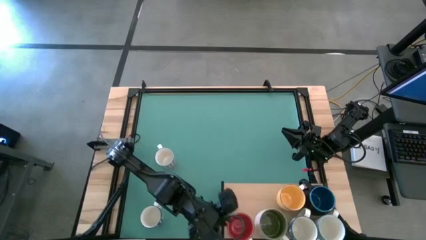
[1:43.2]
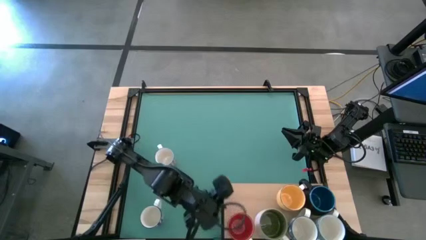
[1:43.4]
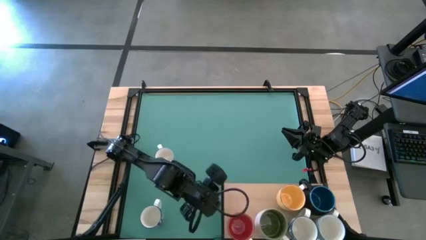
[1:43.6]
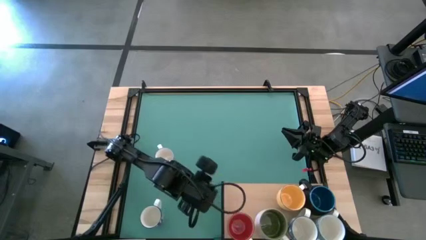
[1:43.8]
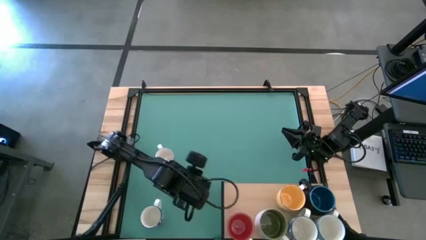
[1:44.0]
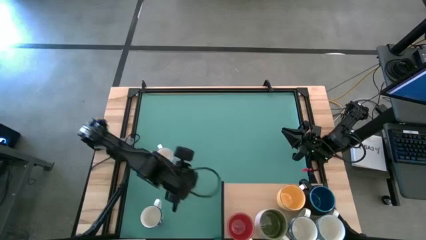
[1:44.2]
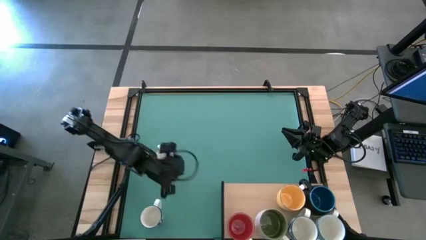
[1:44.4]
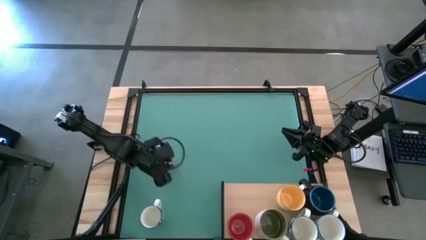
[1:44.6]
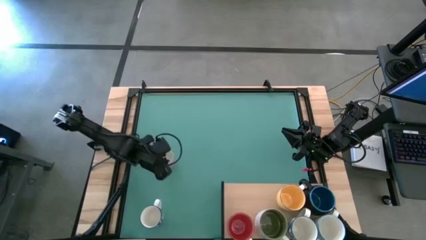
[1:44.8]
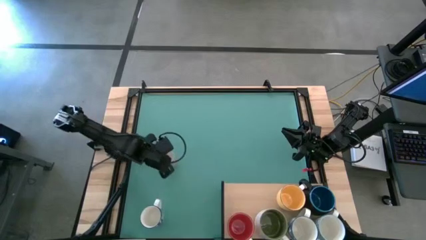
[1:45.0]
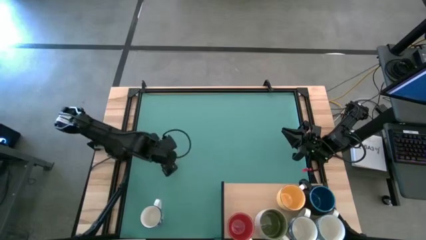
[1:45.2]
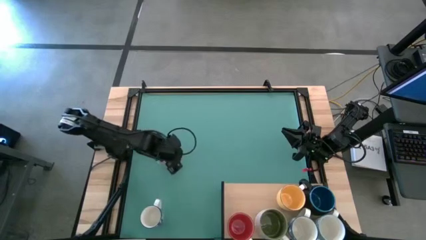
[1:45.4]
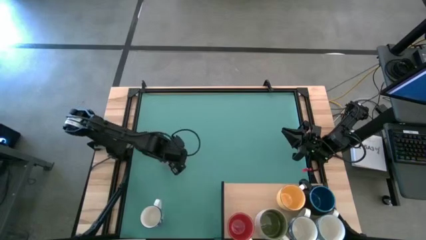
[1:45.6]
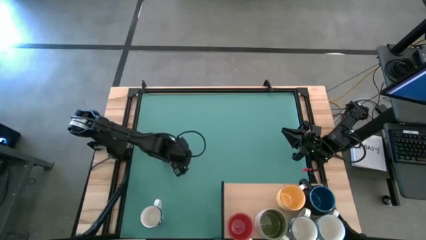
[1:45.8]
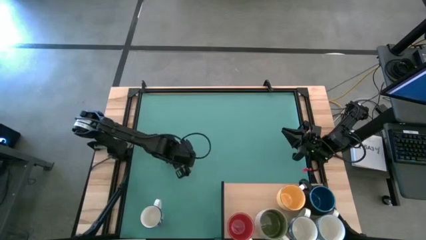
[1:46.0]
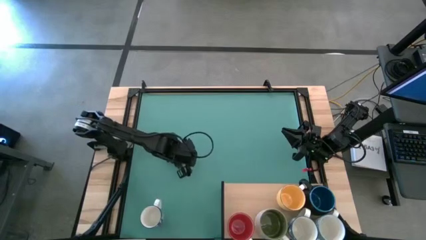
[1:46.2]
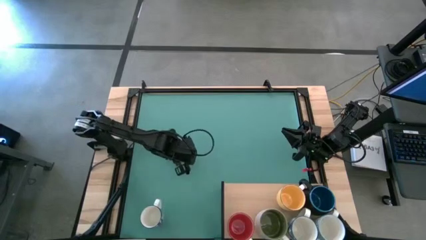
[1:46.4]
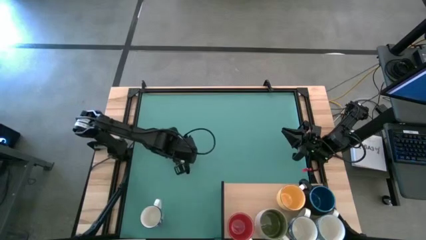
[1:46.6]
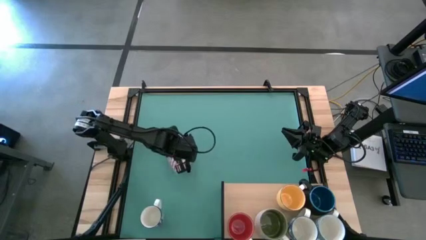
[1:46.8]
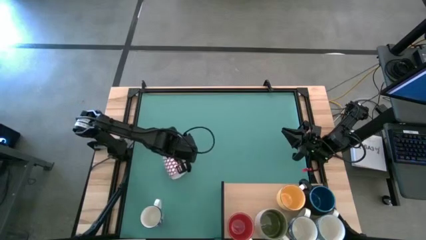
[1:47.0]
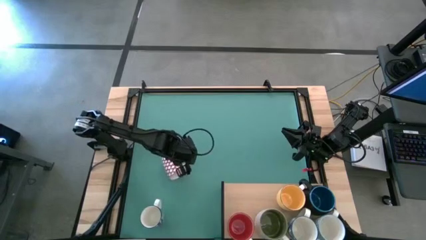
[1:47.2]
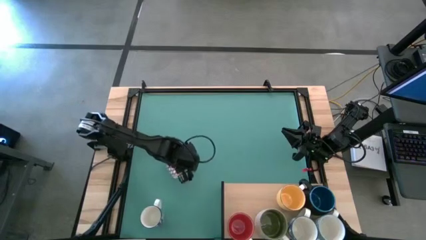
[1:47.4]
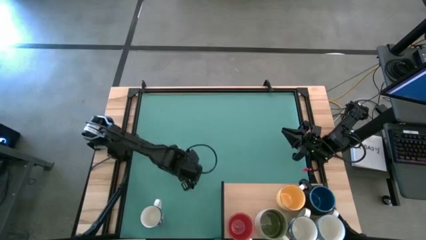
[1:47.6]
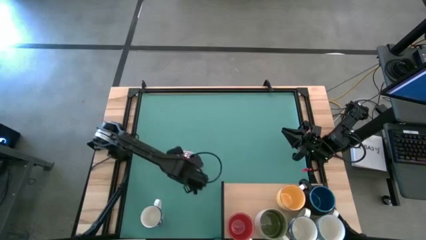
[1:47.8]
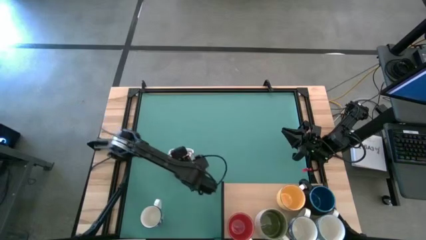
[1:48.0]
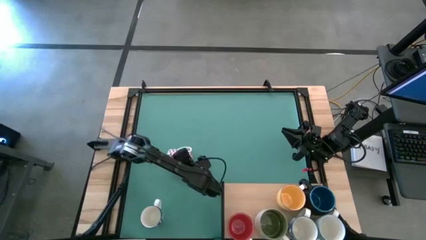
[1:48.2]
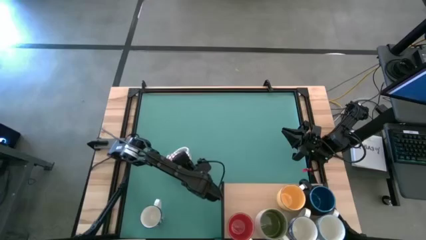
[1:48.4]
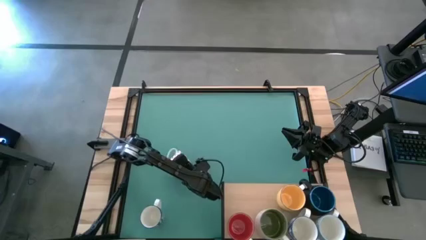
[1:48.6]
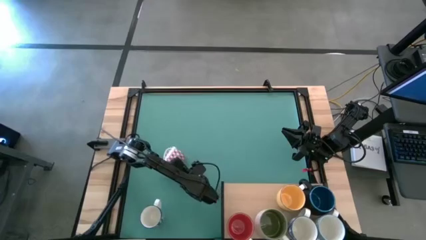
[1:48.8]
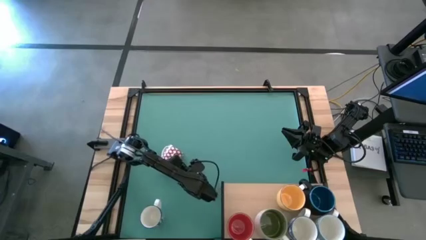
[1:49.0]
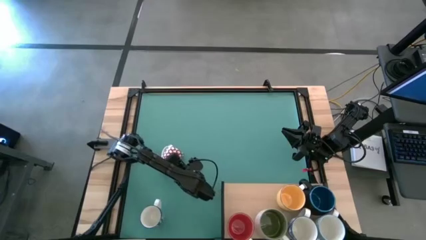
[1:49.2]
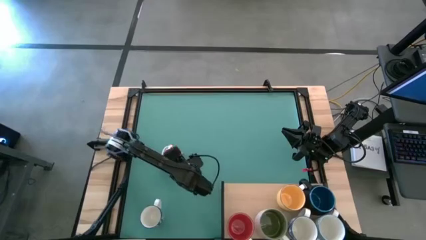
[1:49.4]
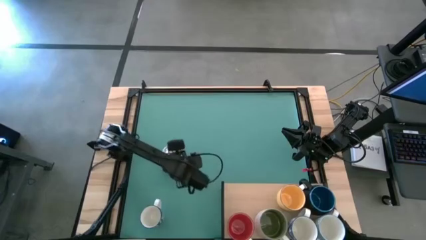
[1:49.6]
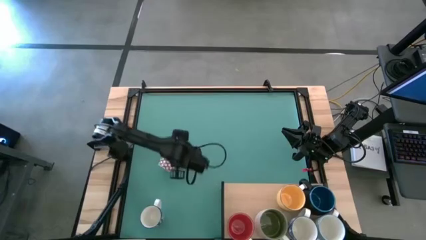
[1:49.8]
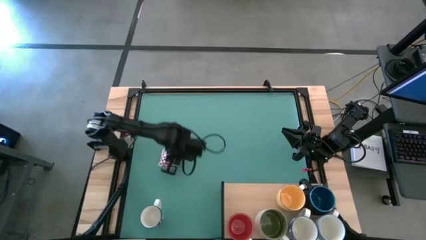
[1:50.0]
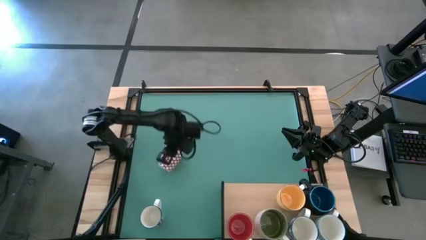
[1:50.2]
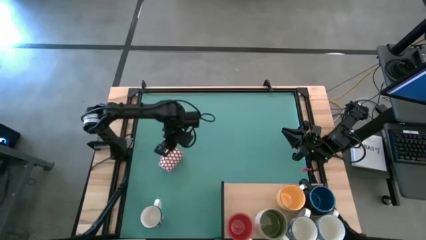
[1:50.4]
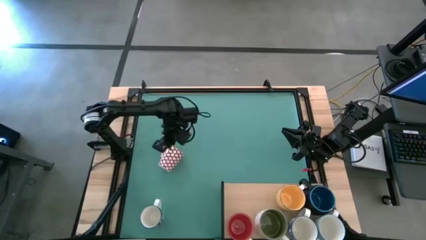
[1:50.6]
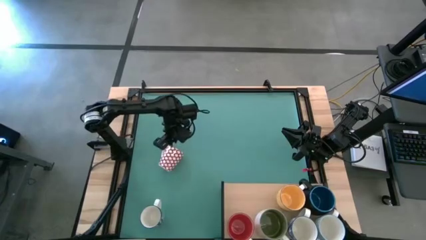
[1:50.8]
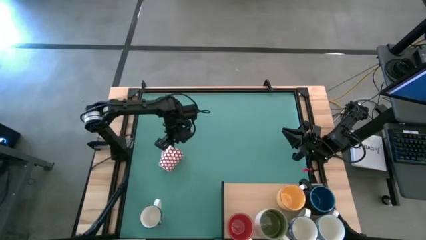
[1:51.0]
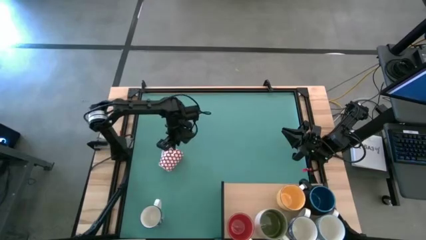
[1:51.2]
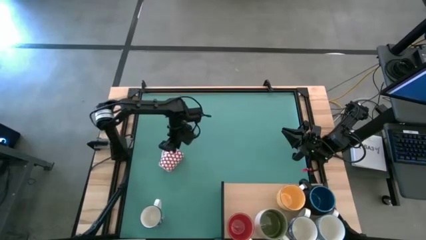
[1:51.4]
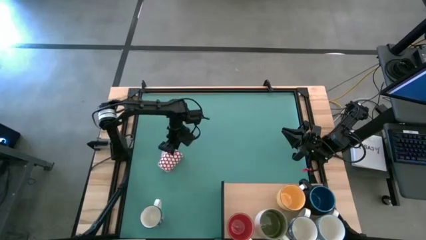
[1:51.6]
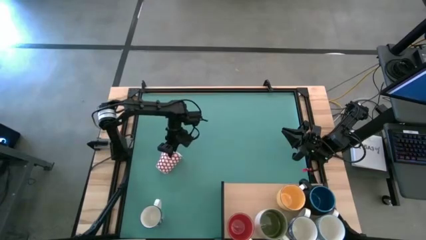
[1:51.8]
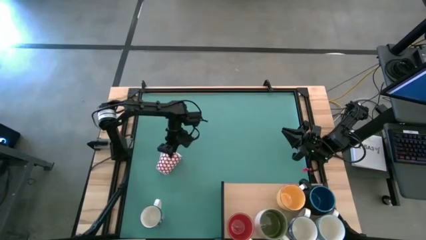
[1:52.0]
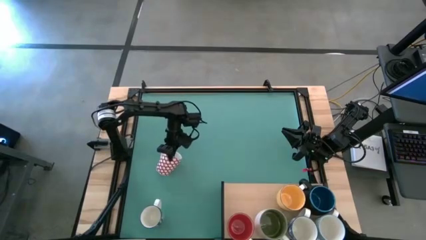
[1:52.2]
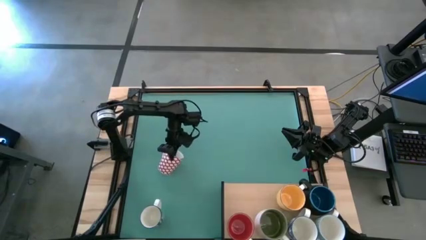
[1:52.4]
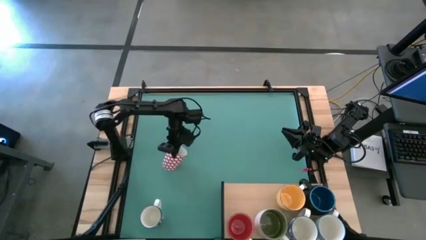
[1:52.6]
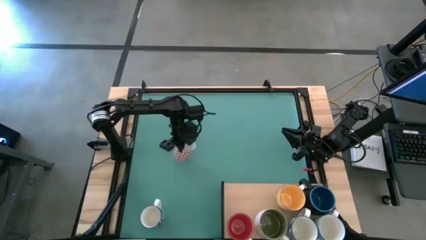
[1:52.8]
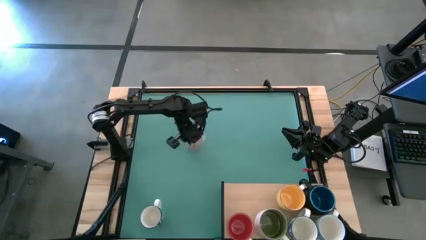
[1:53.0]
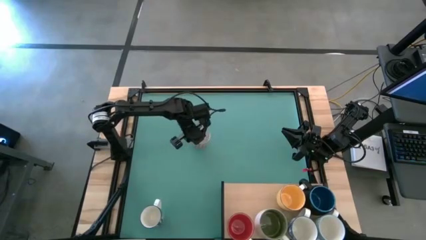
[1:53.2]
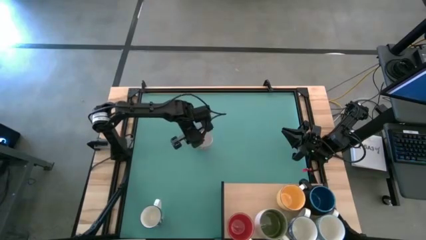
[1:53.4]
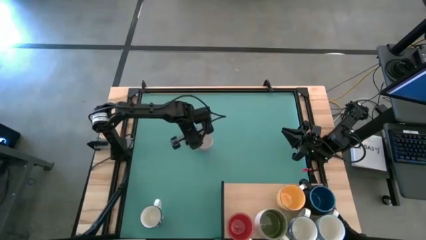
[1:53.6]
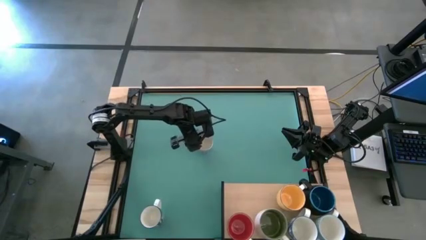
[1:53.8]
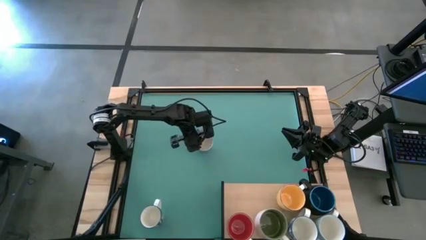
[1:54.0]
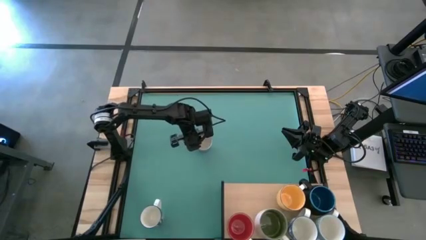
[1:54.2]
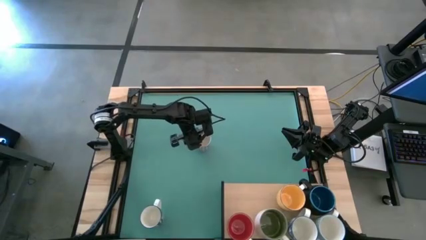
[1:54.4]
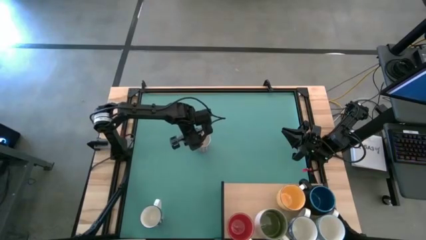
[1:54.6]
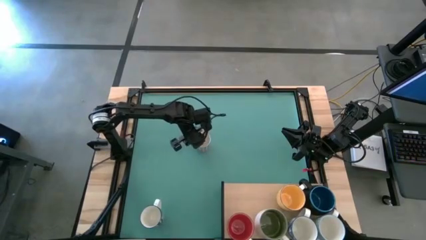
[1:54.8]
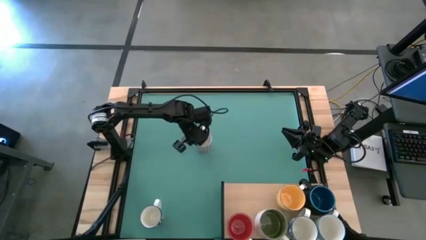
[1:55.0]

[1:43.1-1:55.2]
Task: Place coffee mugs
Put the red patterned mug on the shelf
